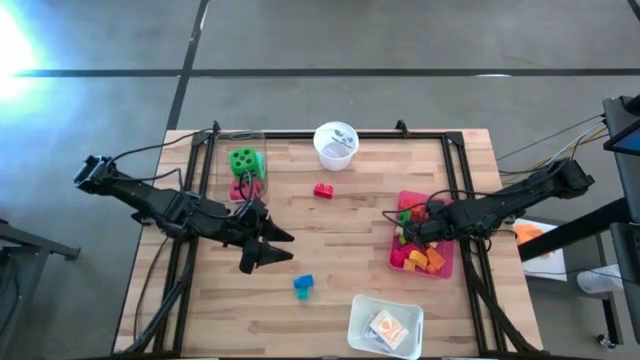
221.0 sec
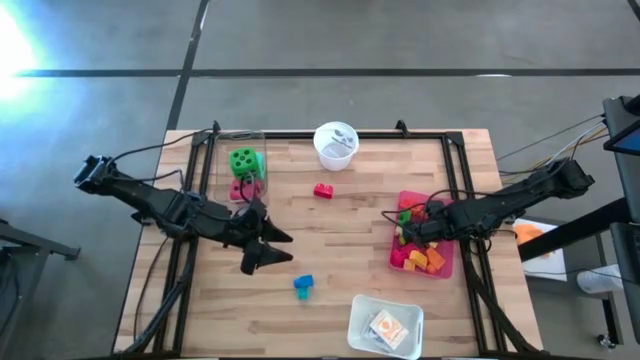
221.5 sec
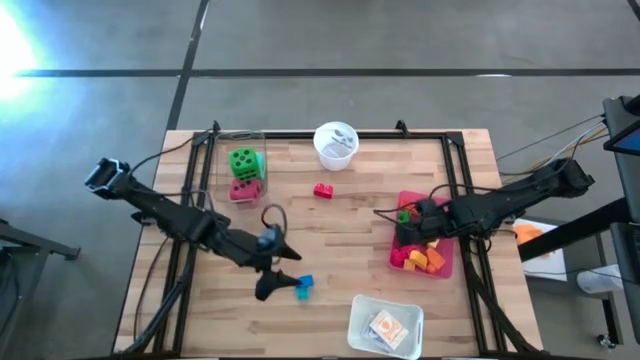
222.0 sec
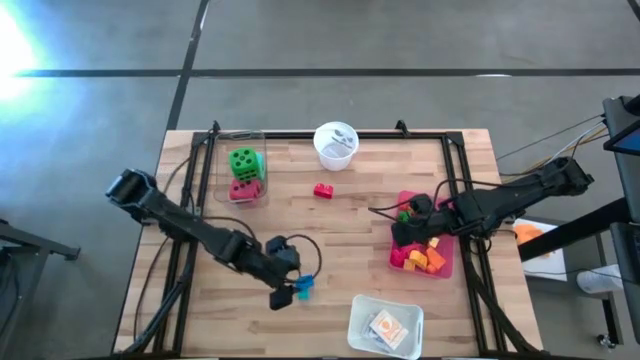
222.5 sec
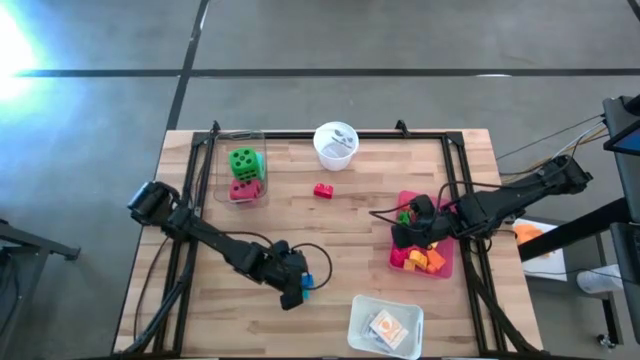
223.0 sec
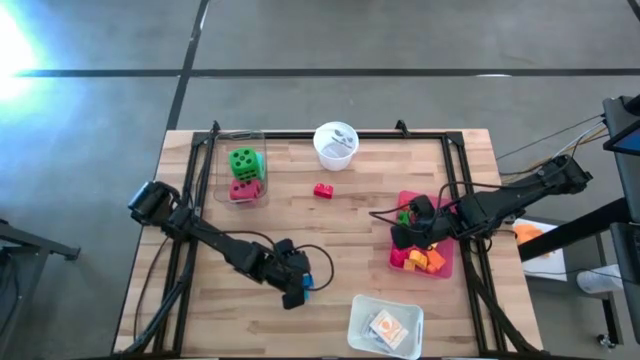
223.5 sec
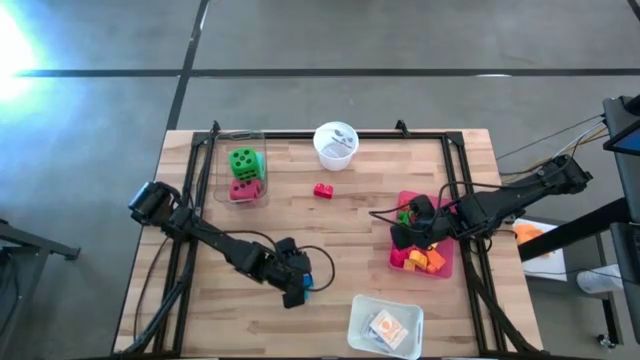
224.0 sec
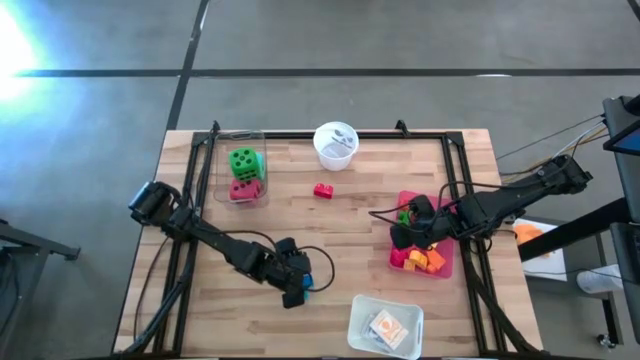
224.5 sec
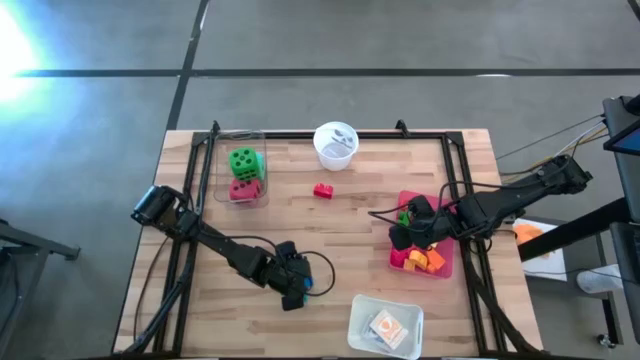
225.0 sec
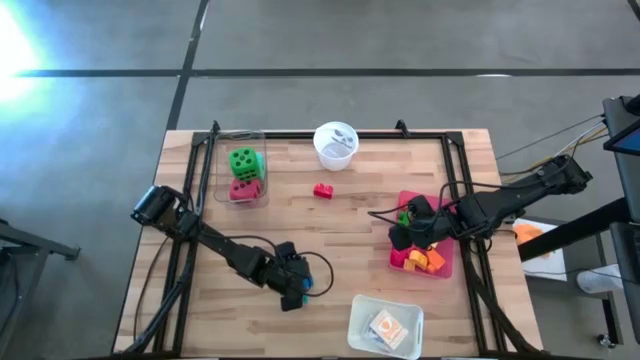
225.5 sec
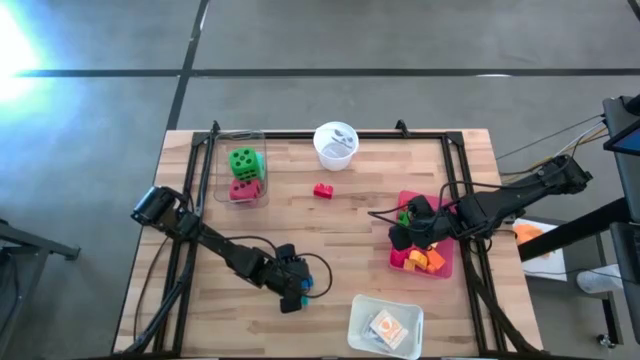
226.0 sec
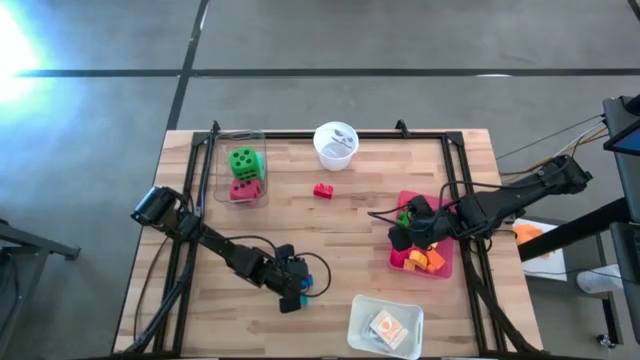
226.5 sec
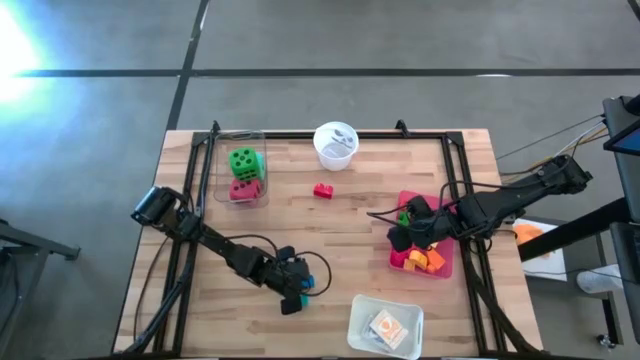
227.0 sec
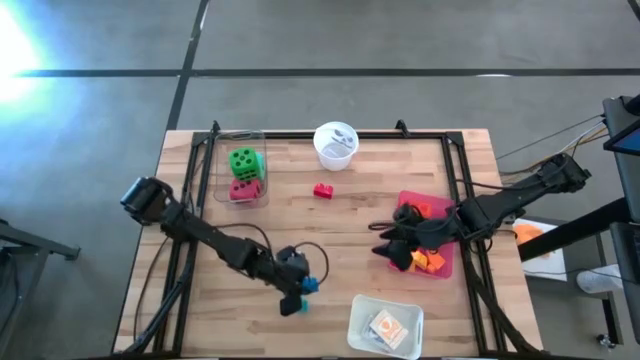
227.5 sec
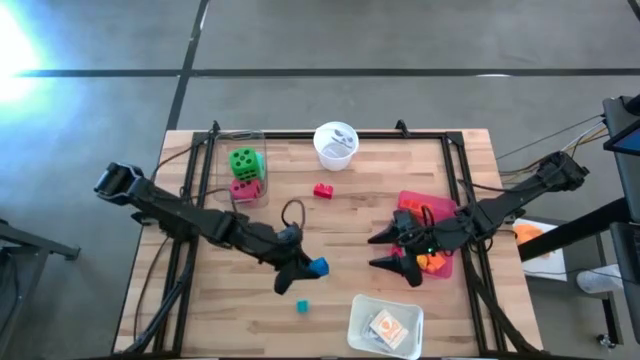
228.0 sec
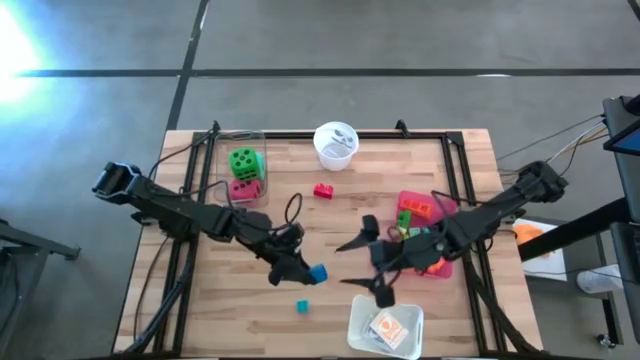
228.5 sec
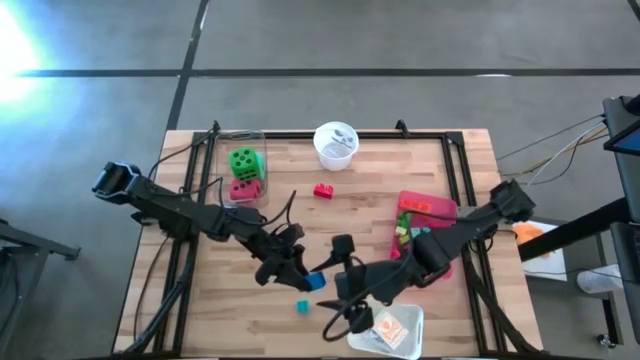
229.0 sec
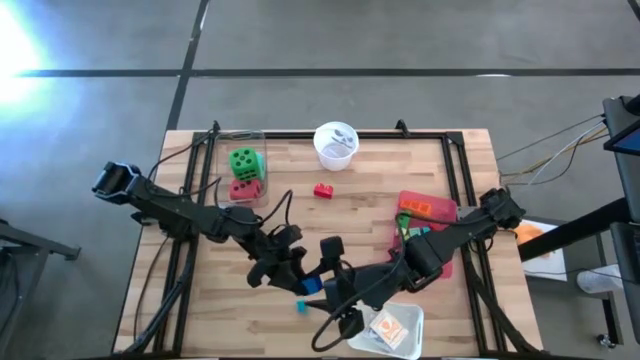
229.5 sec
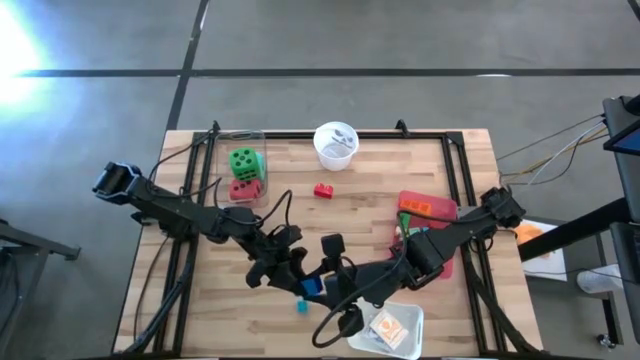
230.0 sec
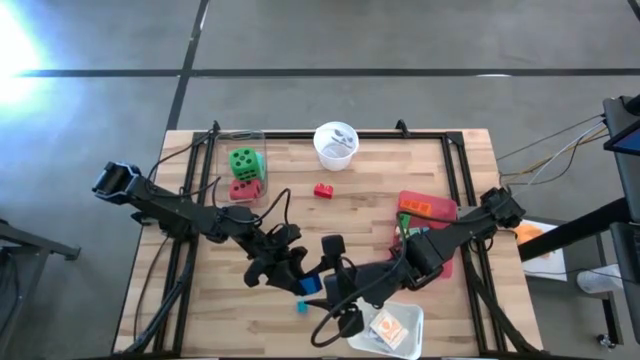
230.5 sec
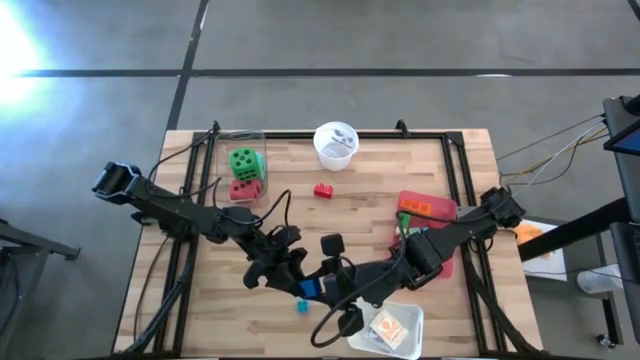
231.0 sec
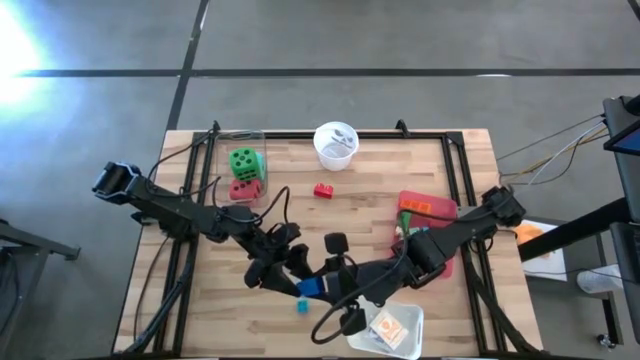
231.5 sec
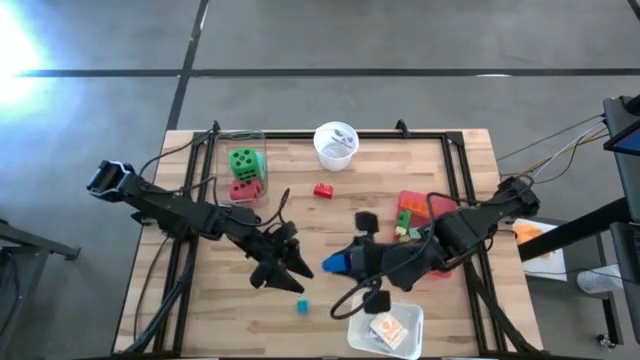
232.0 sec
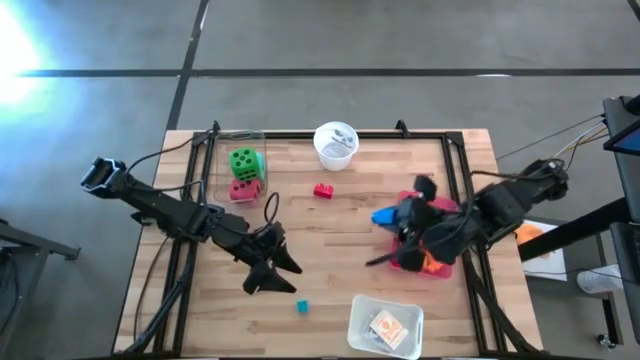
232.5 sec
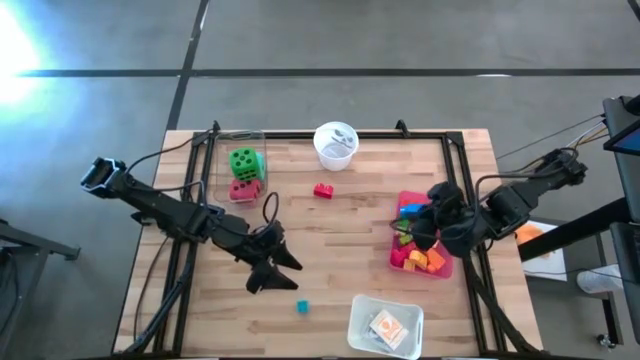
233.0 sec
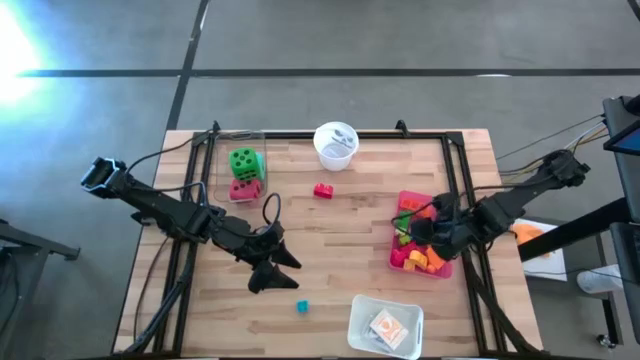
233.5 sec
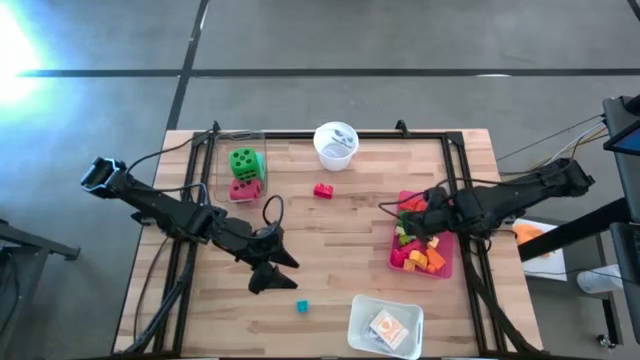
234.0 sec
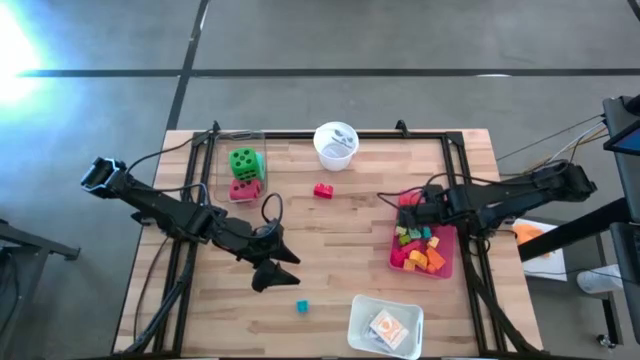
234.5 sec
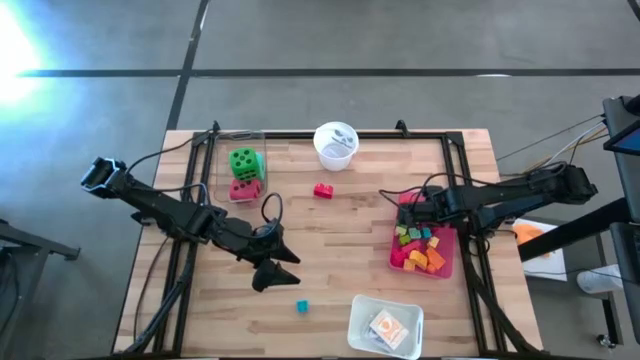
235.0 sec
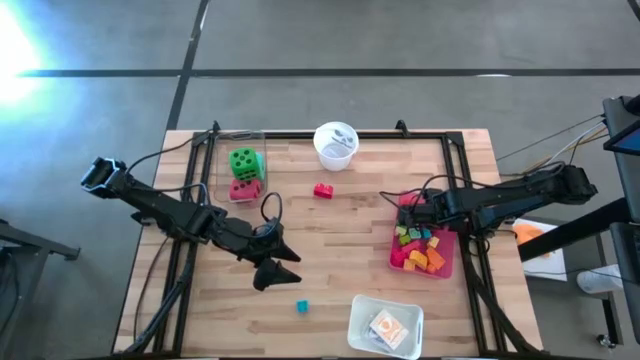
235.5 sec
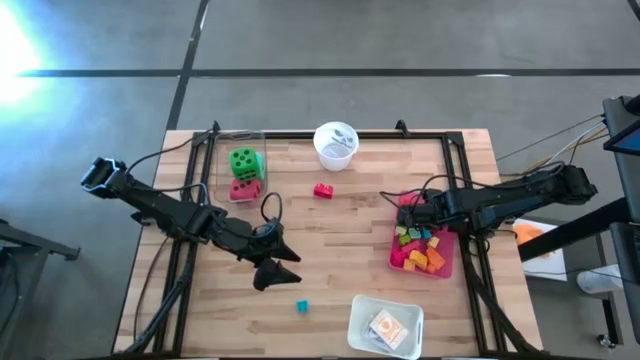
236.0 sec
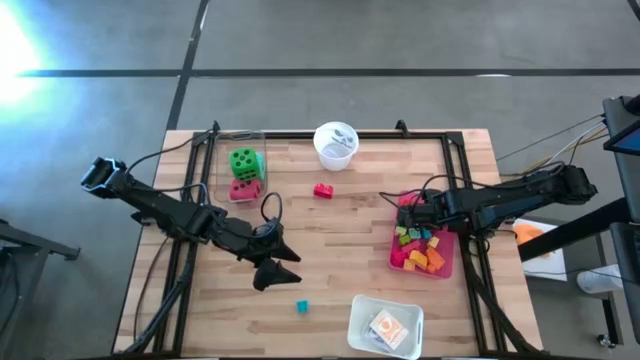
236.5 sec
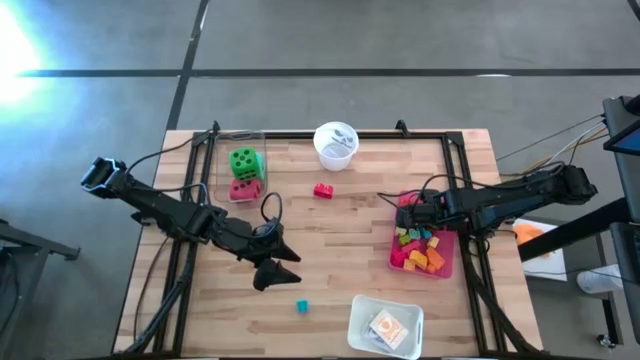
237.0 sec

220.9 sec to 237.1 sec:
Task: Pick & Place Toys
Put the dark blue game piece into the pink bin

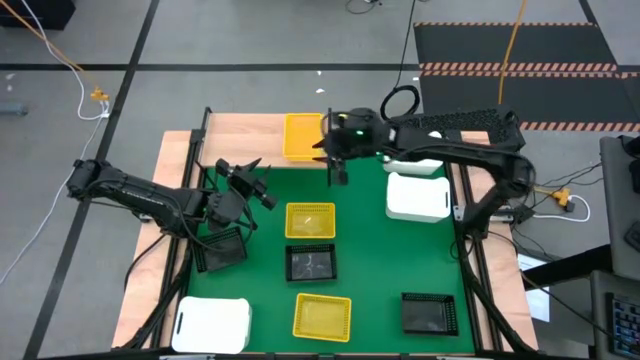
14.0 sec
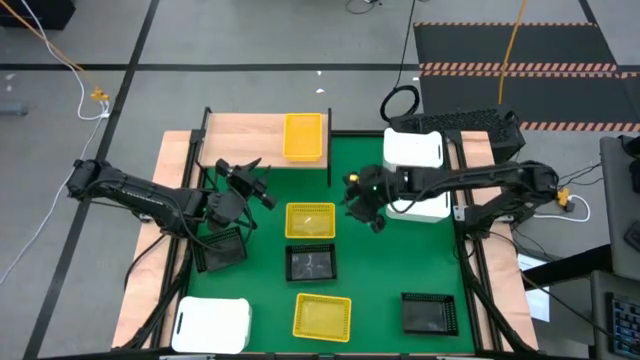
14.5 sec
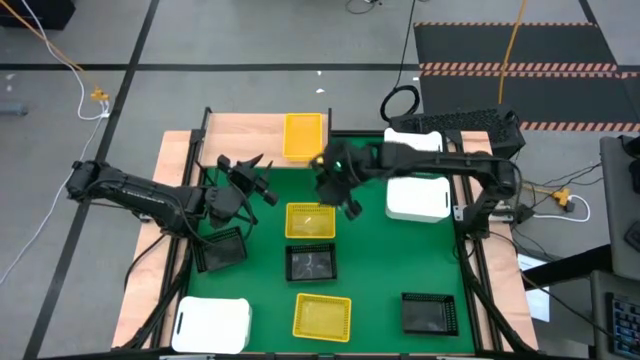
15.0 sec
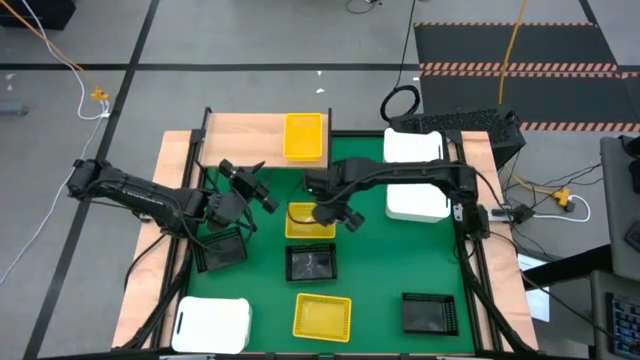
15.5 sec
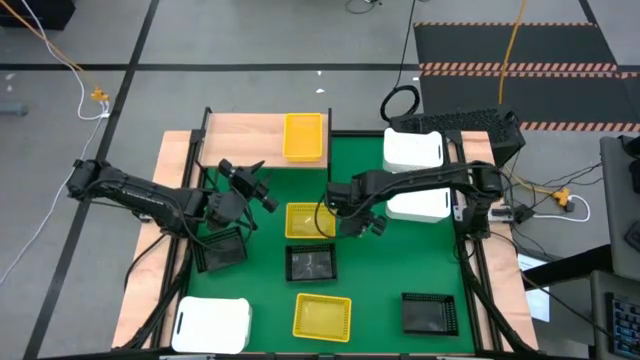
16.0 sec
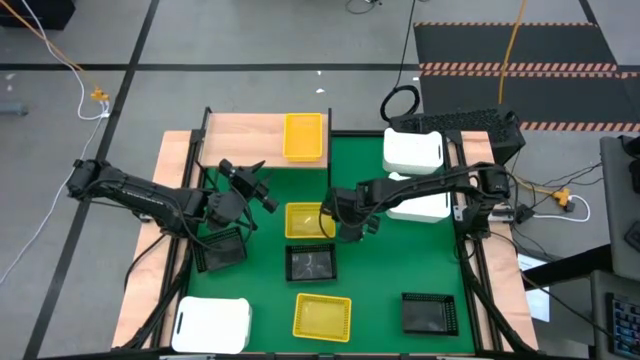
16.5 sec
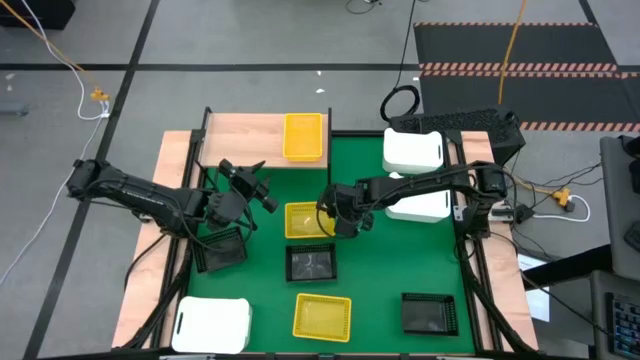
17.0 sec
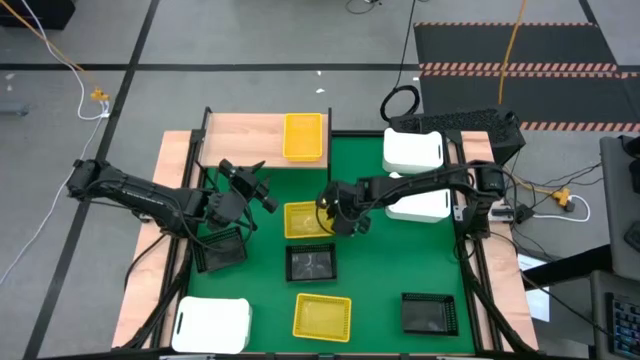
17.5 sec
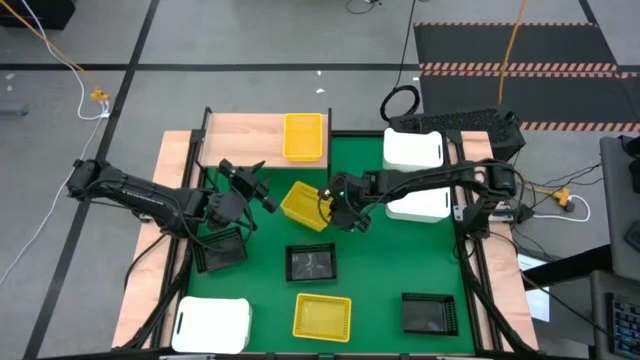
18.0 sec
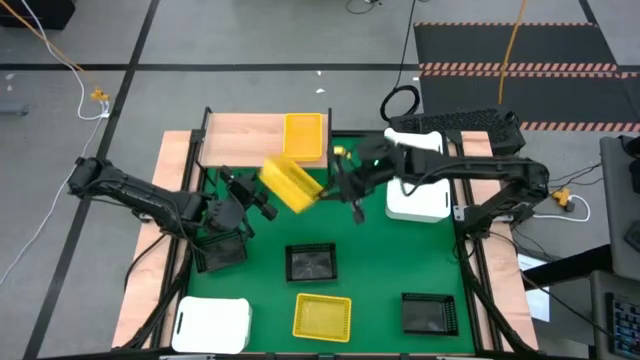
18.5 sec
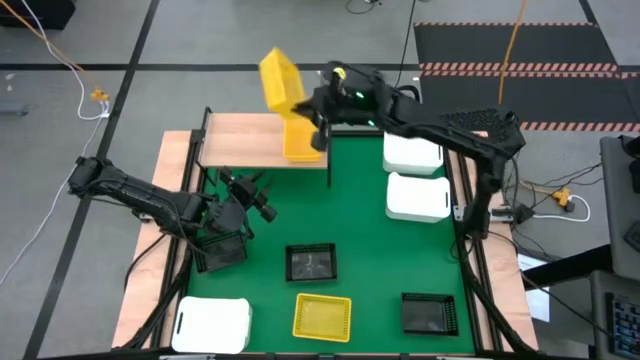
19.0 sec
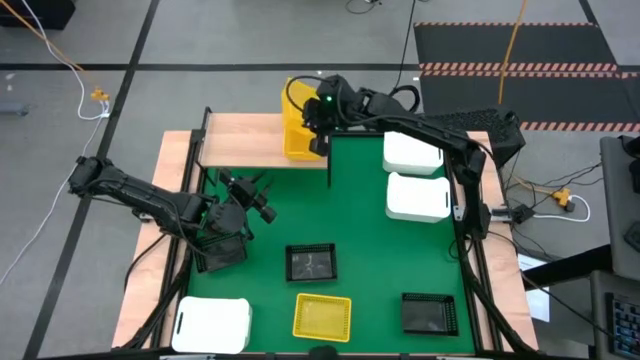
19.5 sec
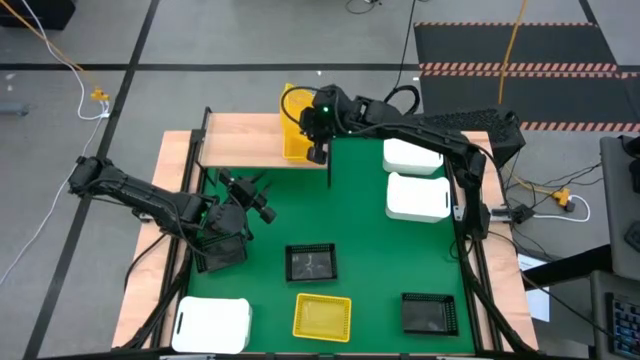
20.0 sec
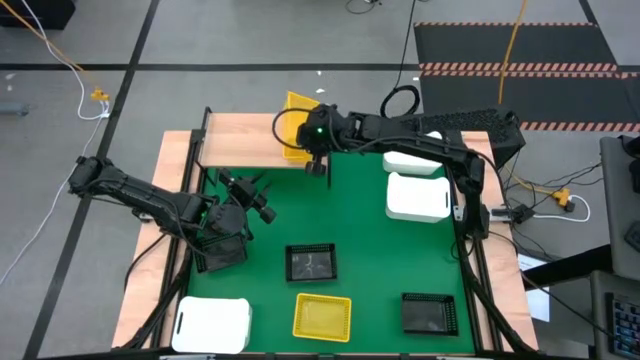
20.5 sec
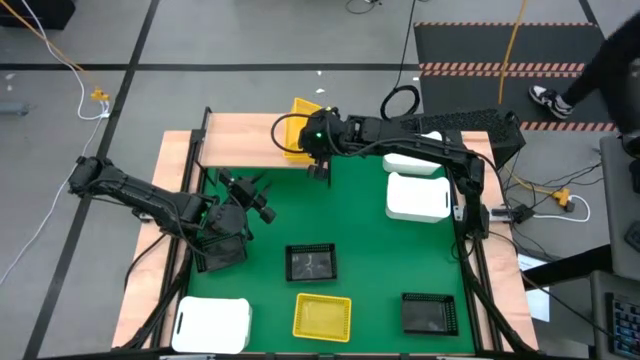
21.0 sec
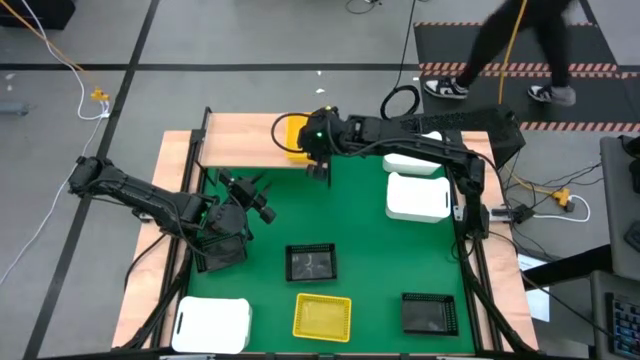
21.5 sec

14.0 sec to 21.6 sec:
Task: Stack baskets on shelf by color
Stack the top yellow bin on top of the other yellow bin on the shelf
